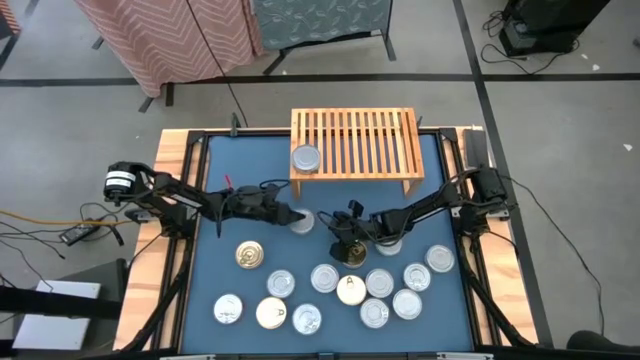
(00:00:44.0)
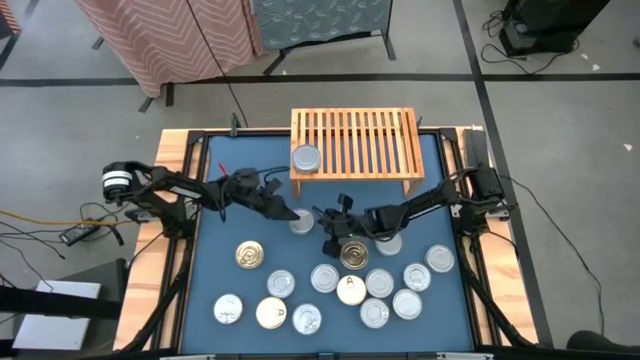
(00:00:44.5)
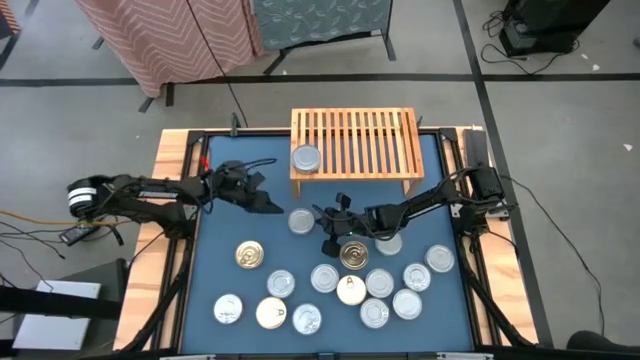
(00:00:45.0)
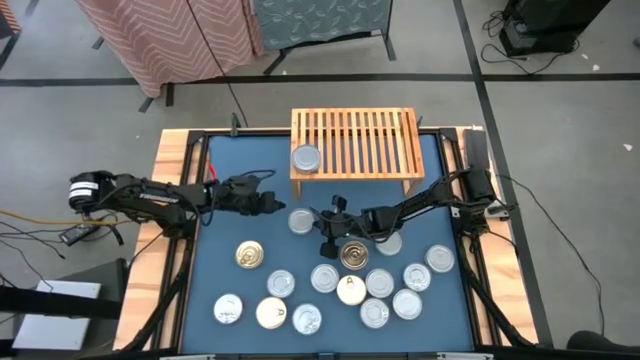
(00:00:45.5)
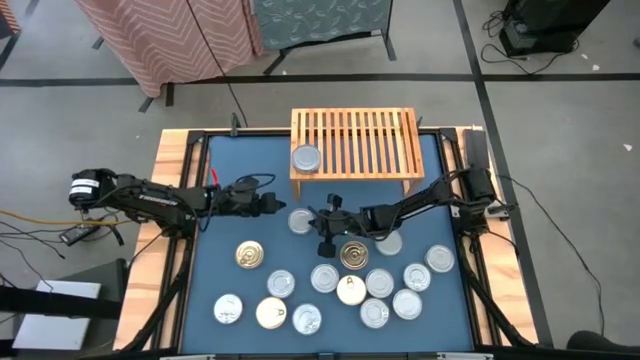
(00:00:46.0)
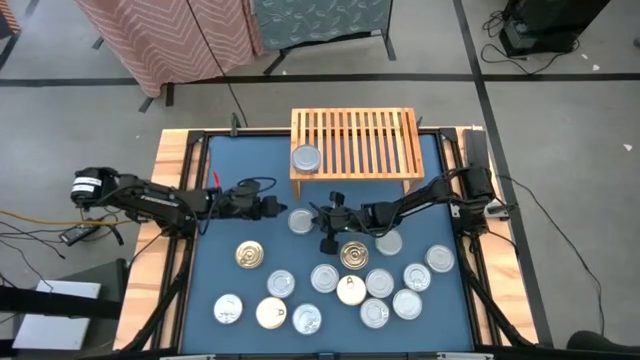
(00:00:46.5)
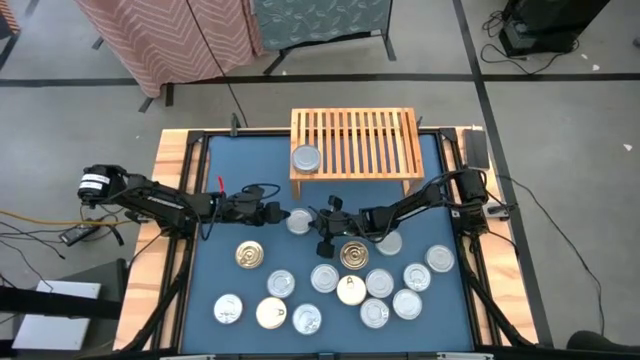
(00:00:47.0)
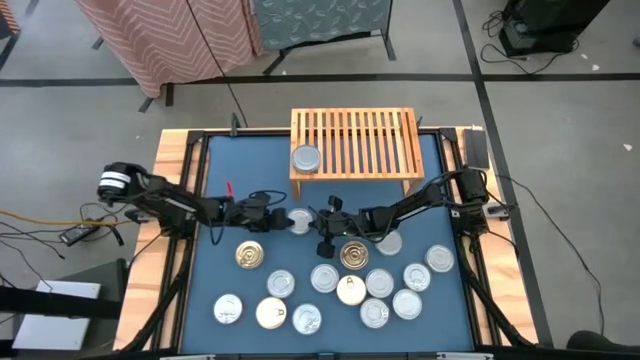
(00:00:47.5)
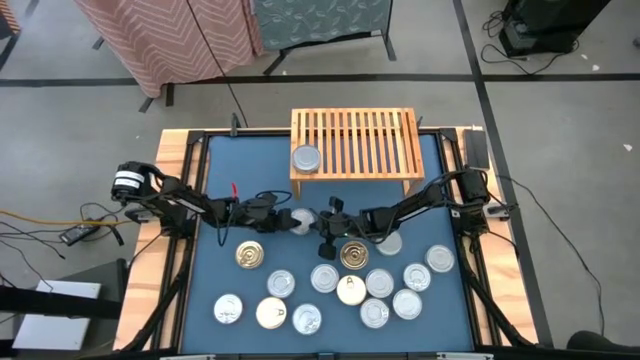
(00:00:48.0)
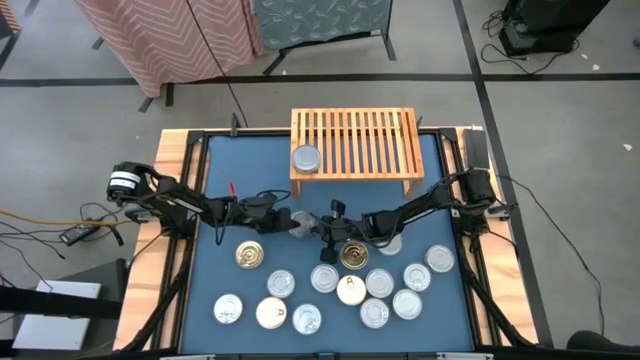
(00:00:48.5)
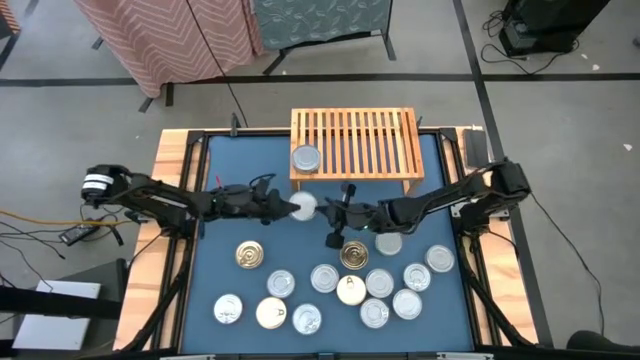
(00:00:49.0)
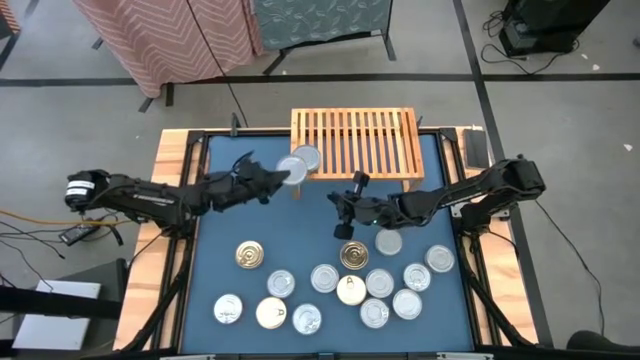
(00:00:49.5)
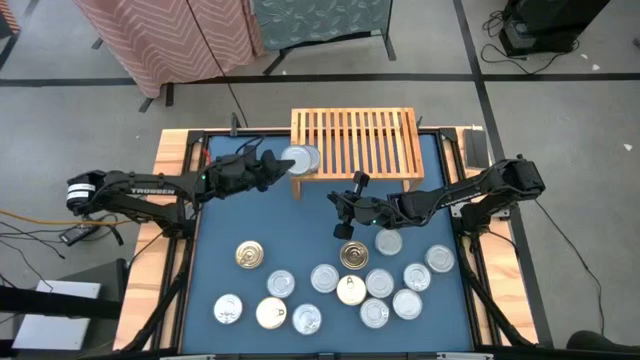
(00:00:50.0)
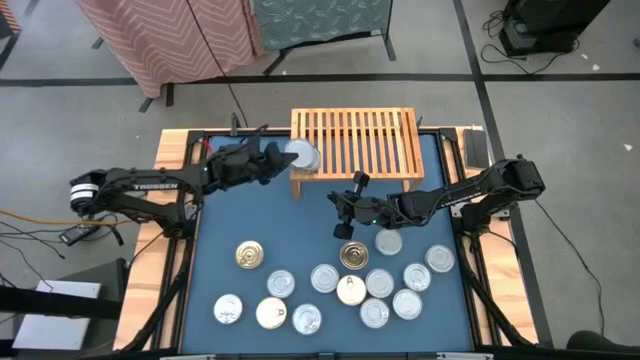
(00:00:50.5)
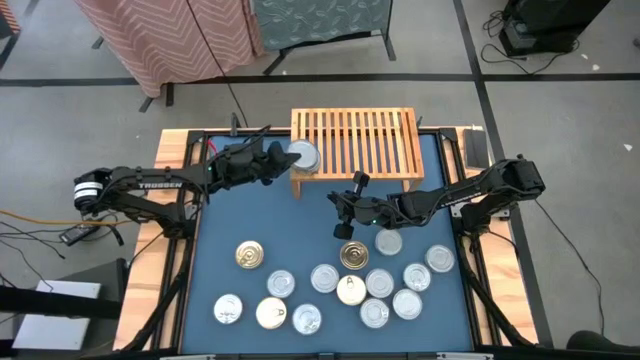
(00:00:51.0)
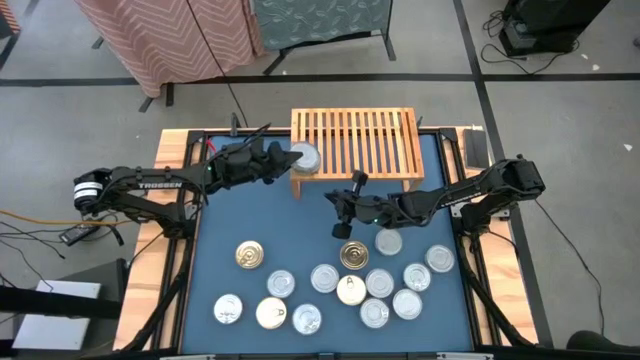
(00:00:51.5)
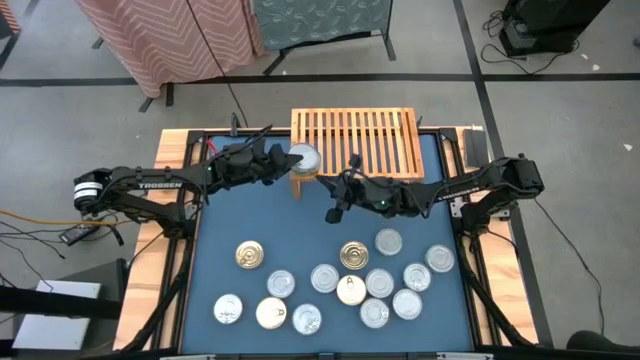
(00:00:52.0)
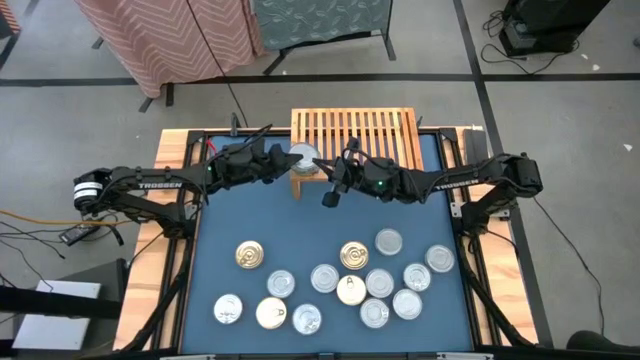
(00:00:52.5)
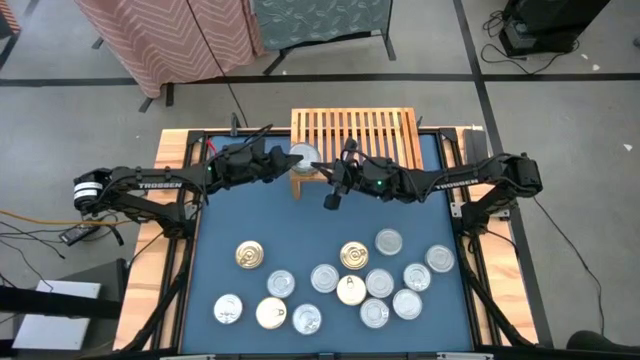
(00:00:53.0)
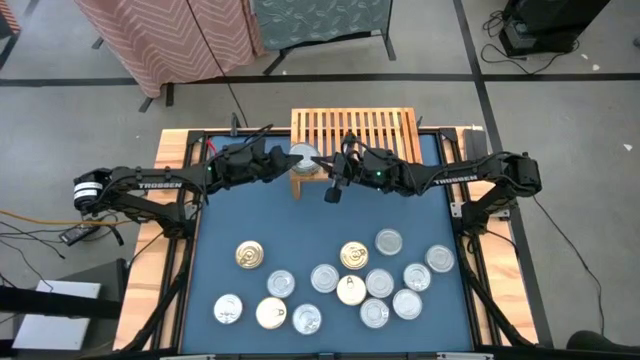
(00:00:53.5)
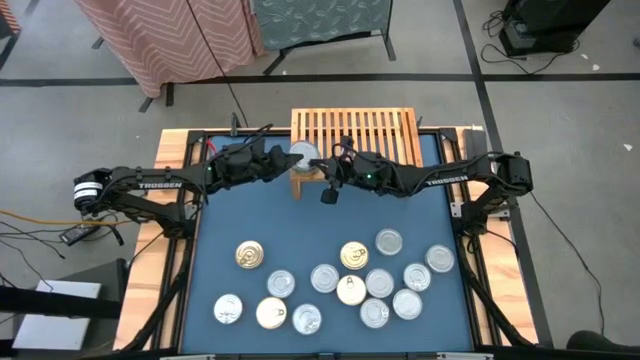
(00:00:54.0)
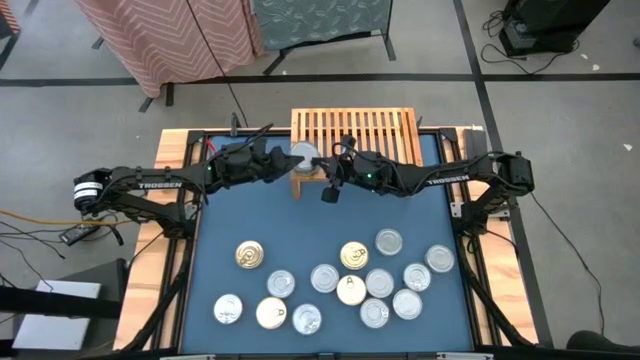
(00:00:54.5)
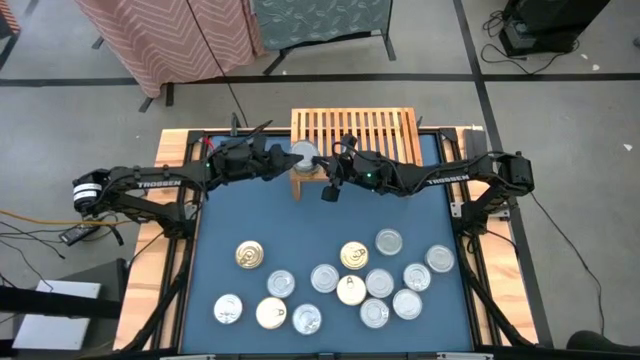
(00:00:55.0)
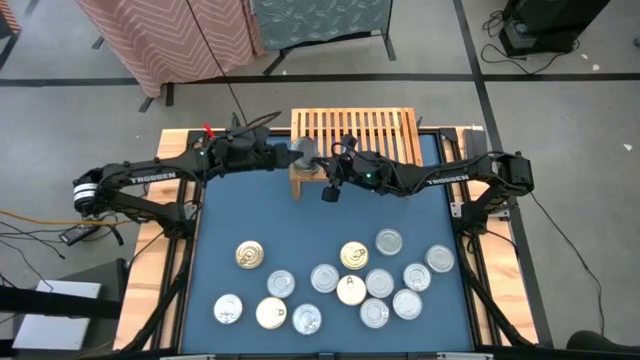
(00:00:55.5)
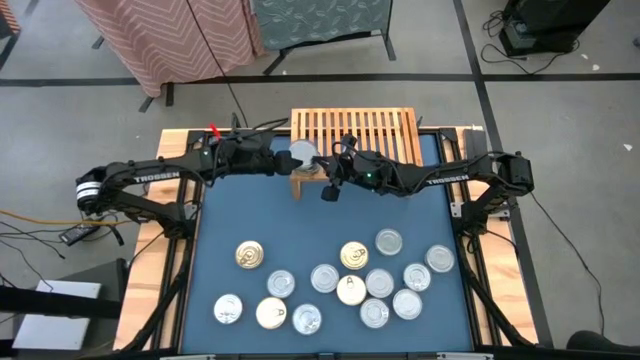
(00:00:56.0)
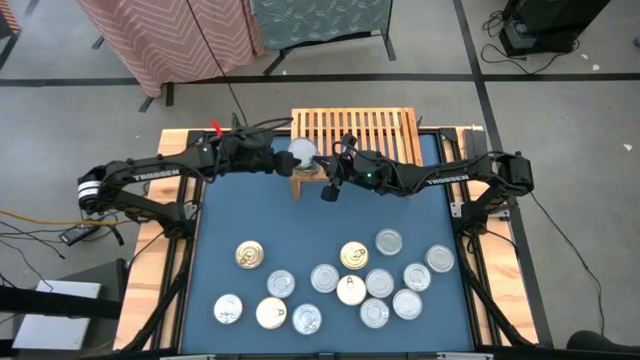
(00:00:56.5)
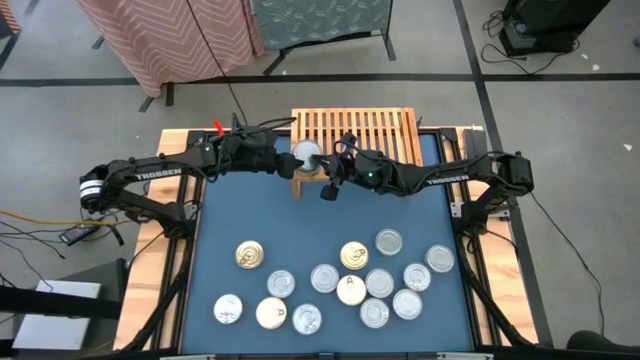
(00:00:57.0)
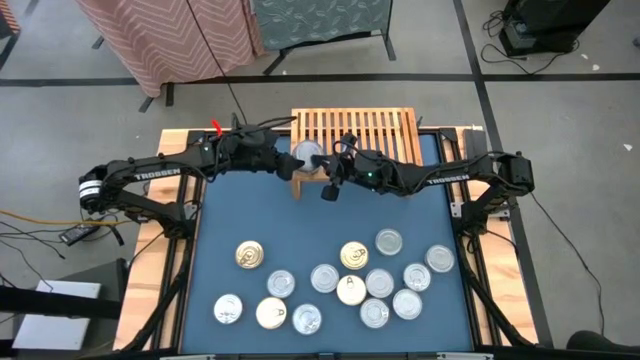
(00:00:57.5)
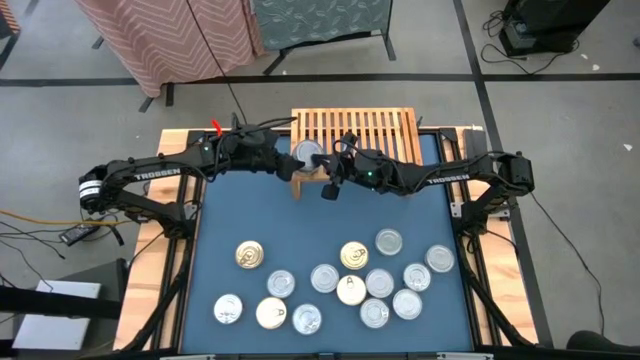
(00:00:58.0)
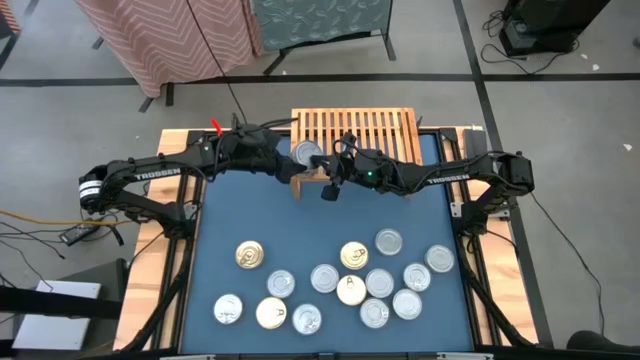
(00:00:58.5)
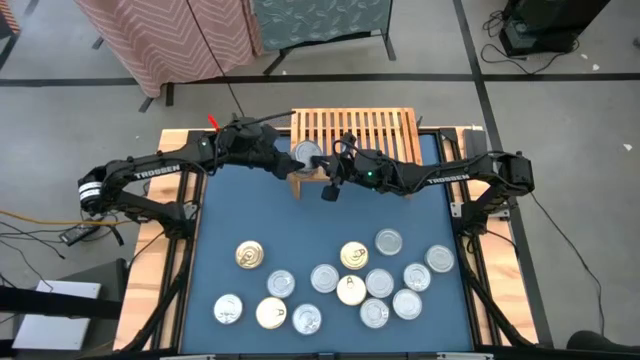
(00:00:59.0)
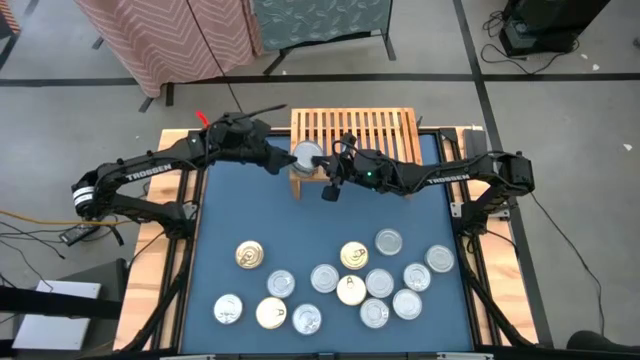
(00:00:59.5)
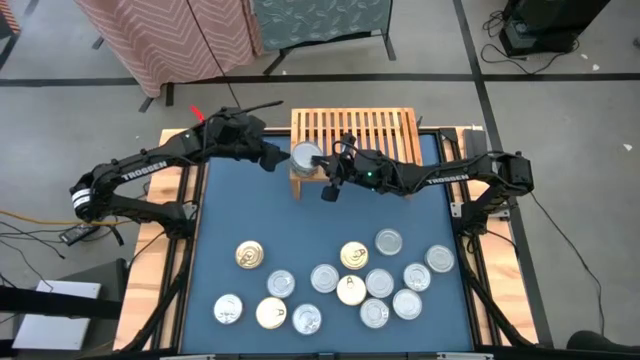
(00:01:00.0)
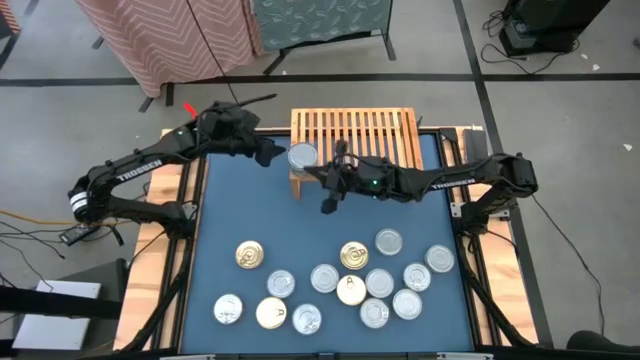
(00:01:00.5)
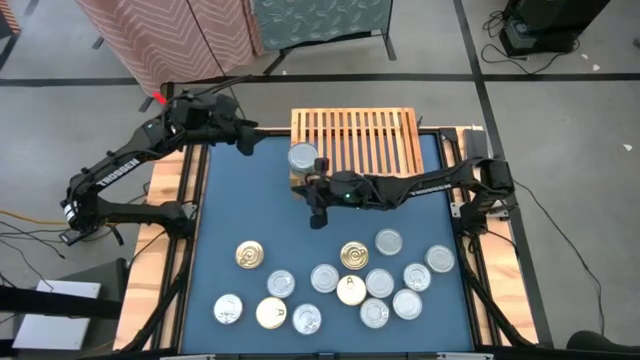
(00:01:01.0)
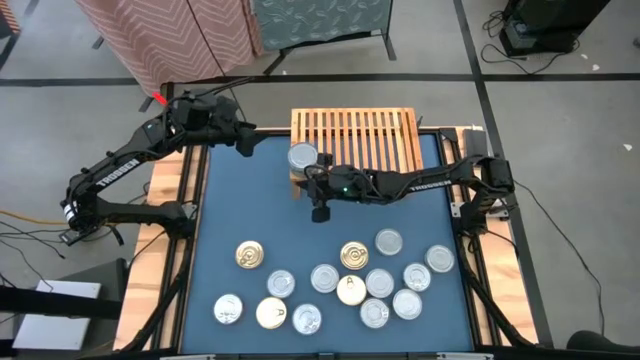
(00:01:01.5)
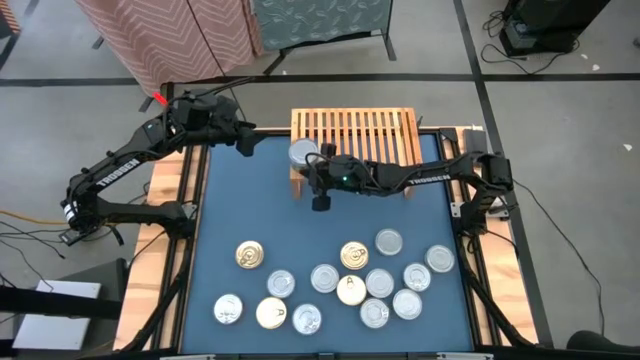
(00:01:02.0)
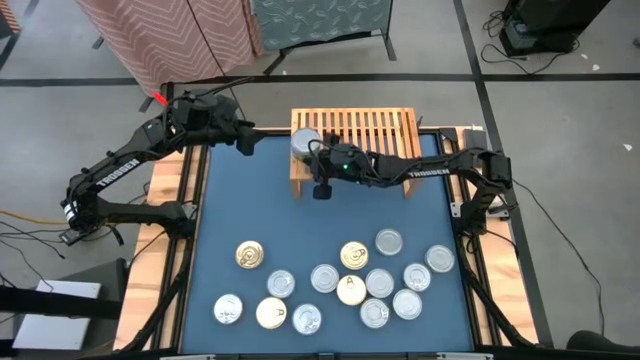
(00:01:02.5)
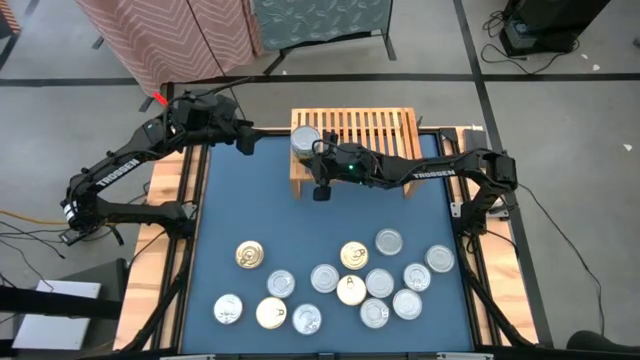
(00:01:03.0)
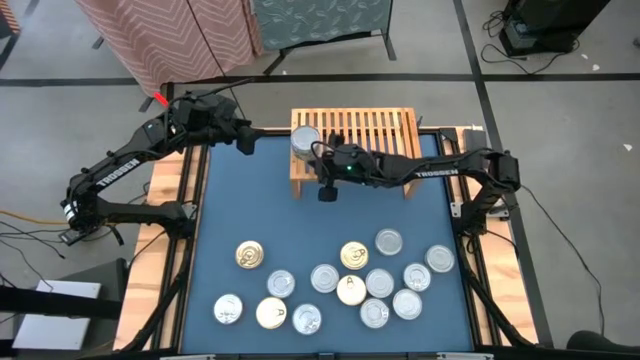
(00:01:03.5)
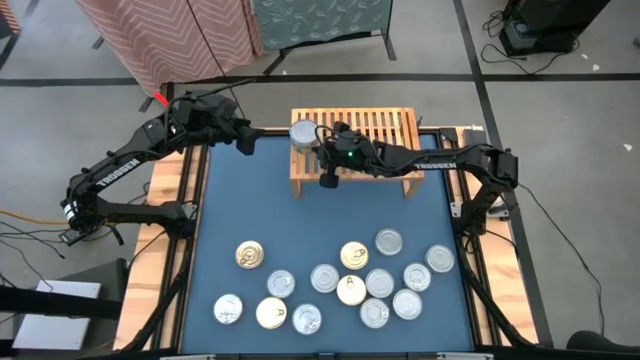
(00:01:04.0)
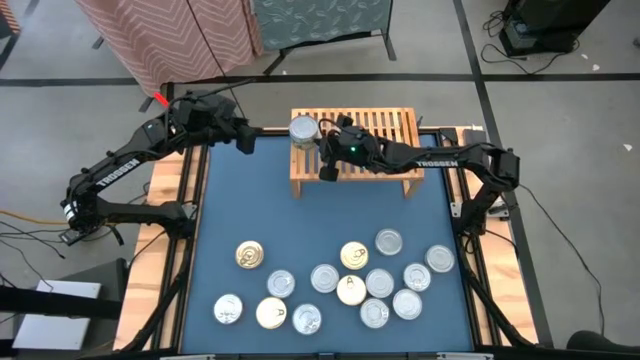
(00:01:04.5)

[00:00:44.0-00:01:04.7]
Task: Stack canned seafood by type on shelf
Stack the green tuna can on top of the green tuna can on the shelf
